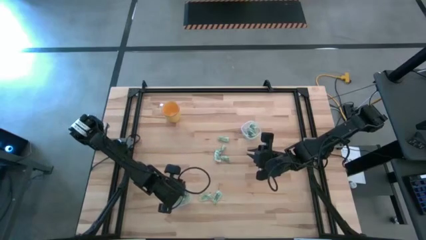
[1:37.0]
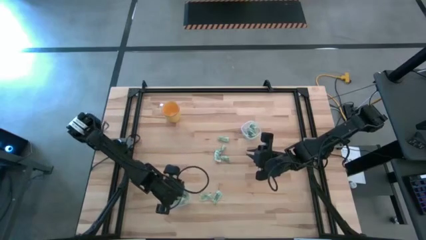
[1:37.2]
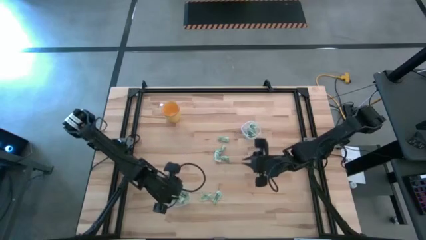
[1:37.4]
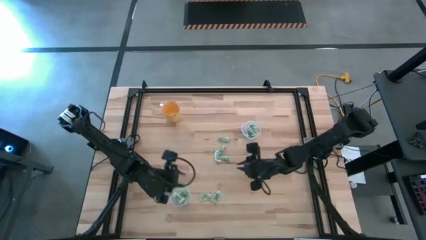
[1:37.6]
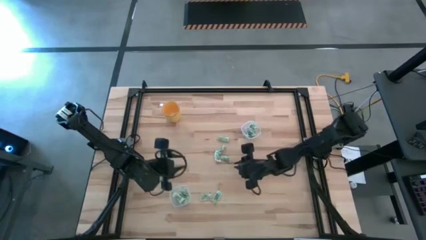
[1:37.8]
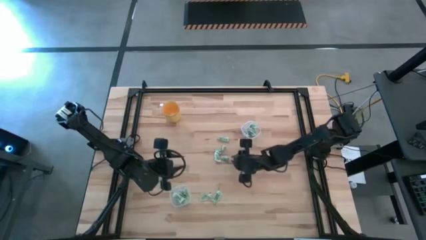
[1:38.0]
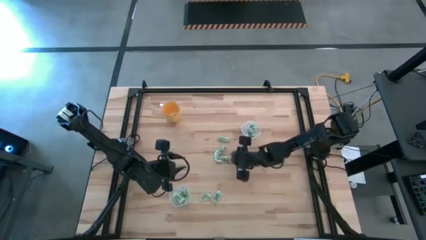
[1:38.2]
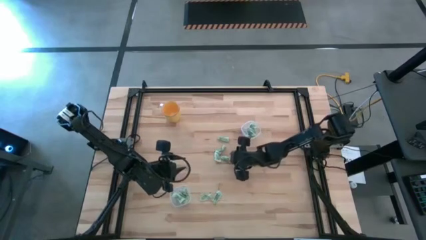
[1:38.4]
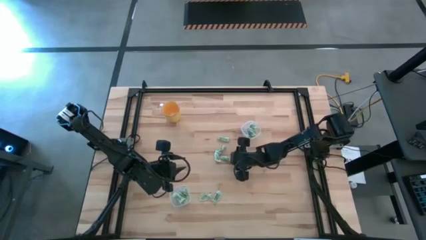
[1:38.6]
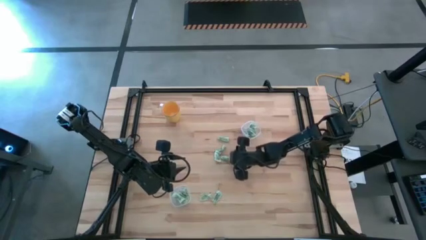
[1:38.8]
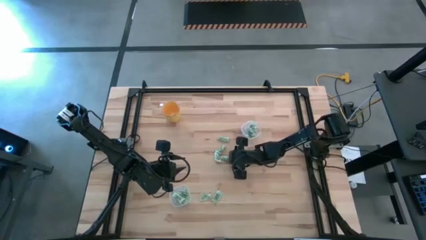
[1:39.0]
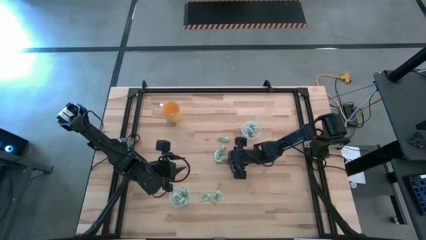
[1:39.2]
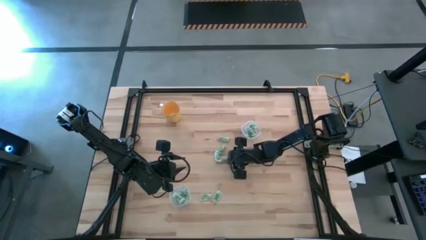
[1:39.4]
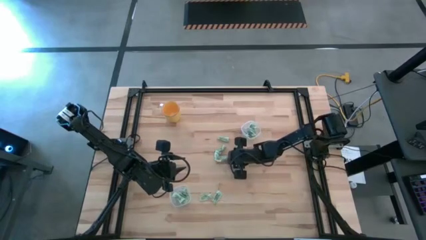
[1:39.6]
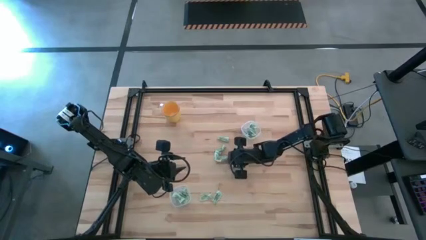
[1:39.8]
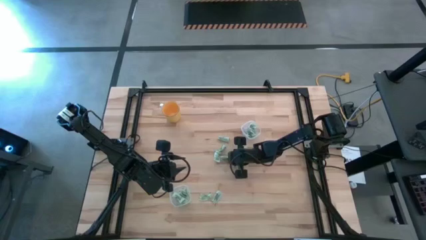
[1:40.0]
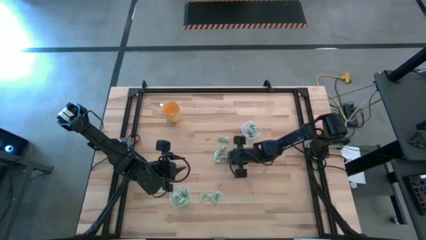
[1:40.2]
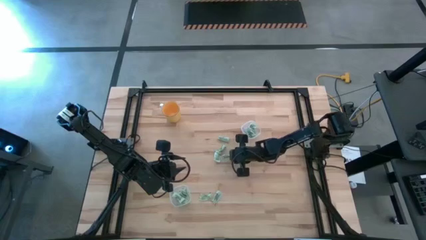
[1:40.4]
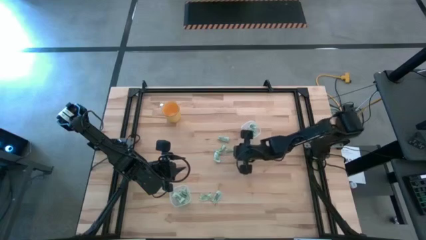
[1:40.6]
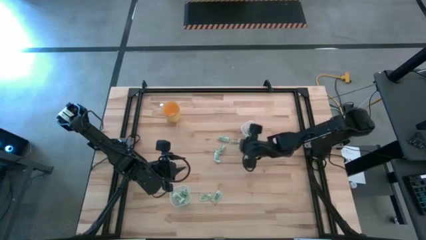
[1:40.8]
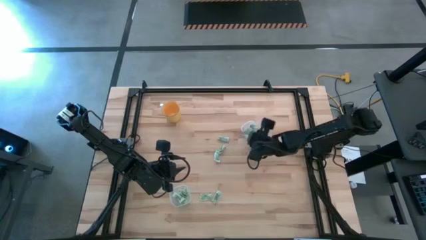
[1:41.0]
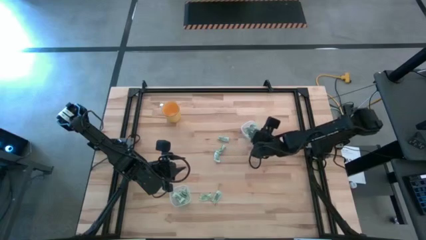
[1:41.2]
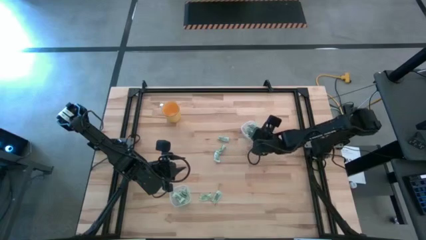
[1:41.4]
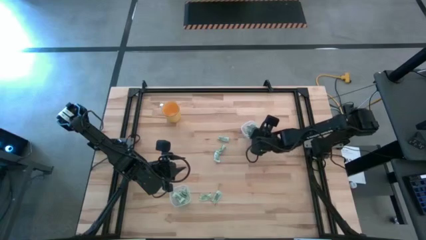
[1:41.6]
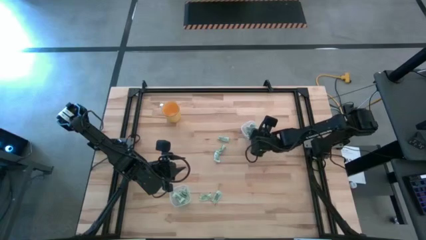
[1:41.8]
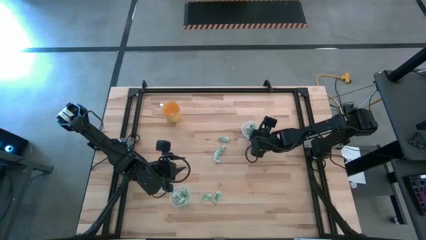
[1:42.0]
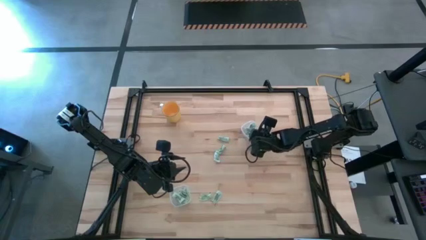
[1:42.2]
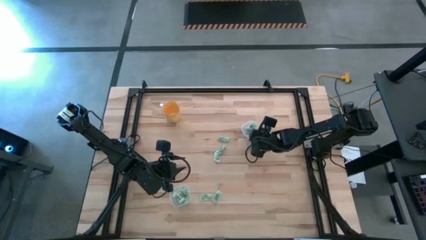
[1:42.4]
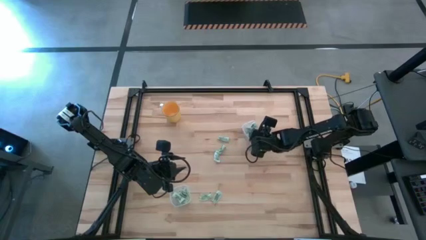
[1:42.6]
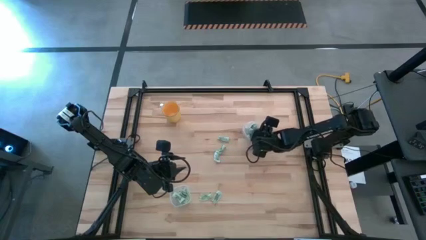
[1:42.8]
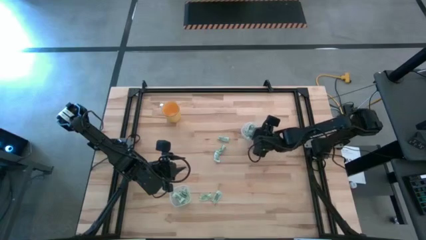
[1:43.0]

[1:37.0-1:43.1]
Task: Pick and place Stevia / Truvia into bins
Put the green stevia packet into the top transparent container

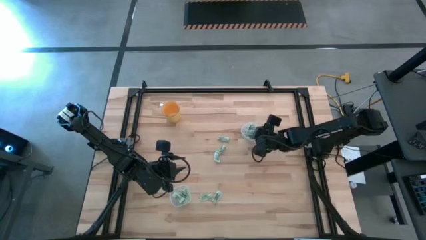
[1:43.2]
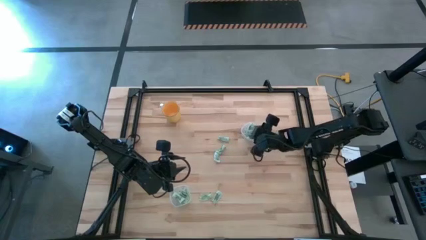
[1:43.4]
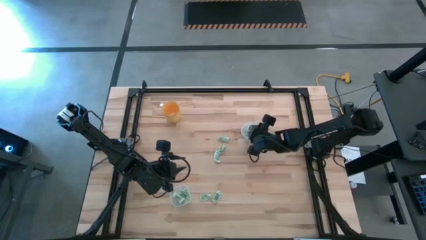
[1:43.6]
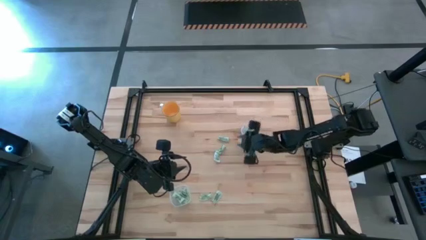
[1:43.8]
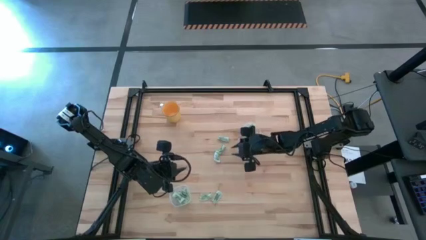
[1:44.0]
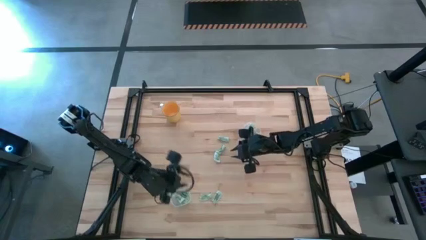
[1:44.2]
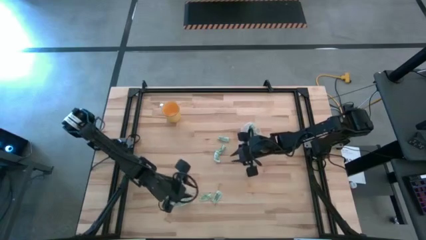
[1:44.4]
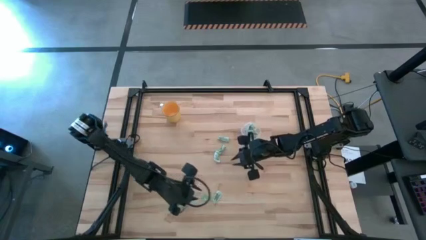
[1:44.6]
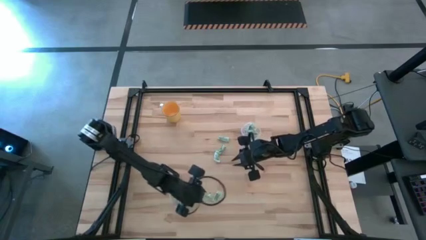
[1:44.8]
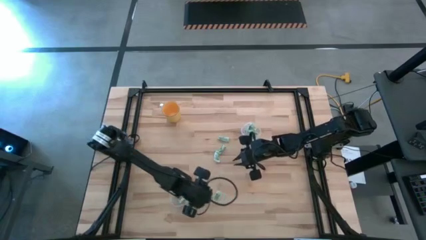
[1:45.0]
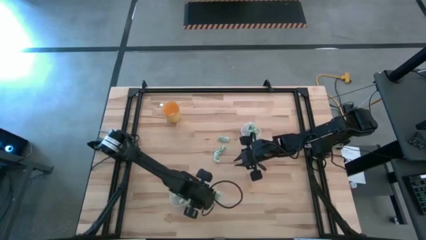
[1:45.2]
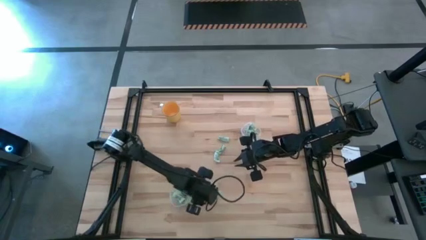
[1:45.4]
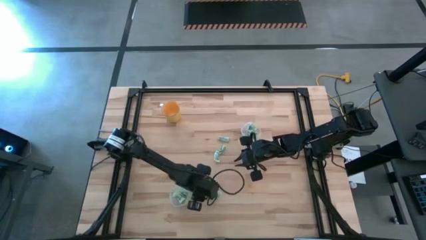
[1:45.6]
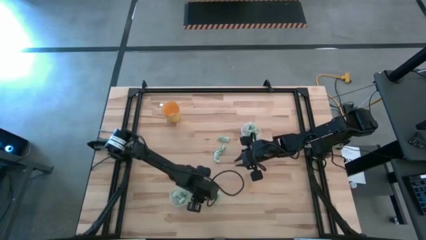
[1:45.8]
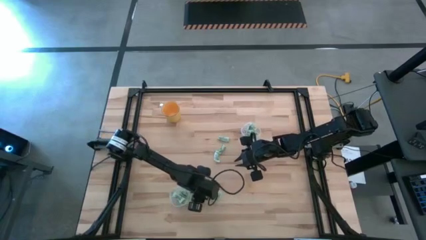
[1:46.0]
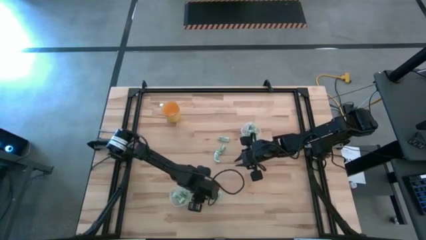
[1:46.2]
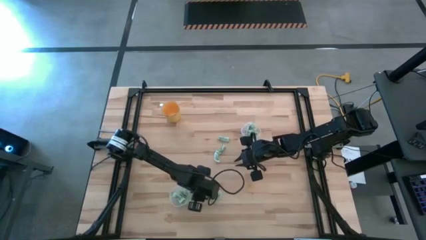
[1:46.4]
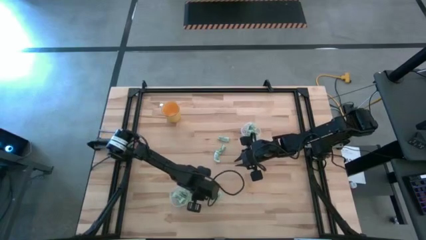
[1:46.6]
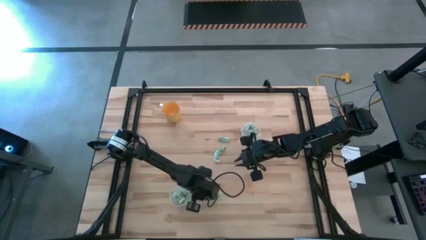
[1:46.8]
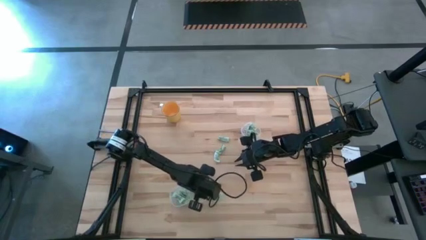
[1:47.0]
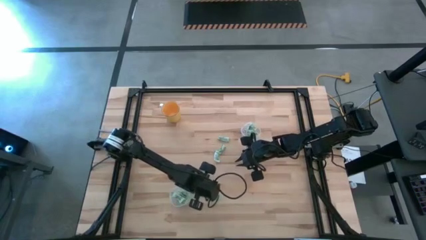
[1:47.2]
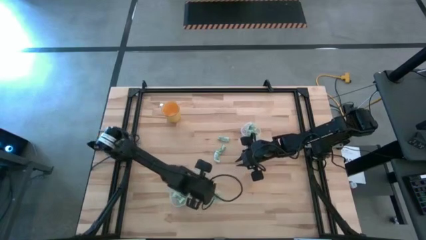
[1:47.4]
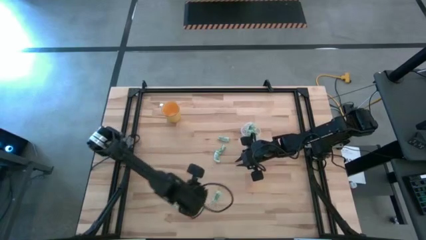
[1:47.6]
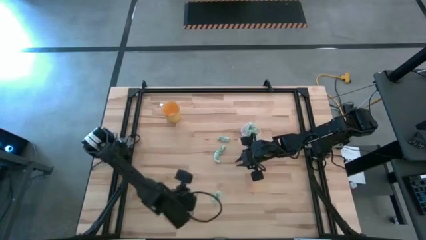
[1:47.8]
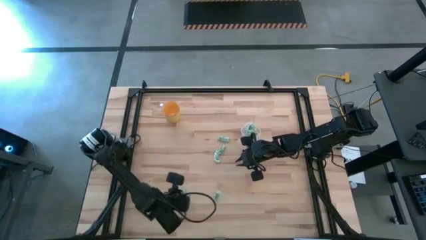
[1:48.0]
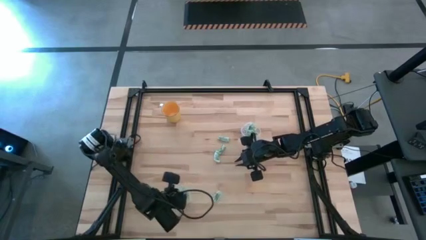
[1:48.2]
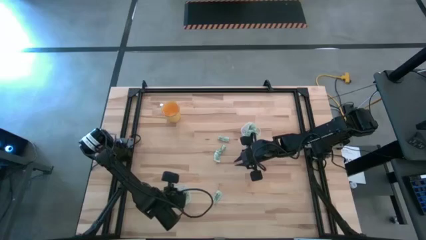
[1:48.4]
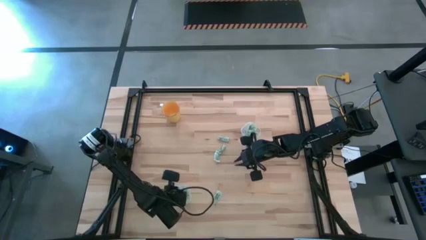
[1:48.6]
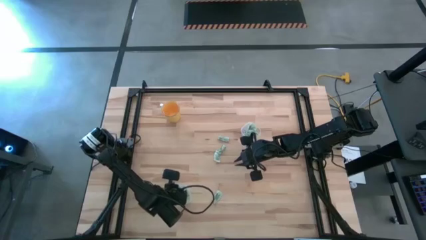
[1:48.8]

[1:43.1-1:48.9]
Put the green stevia packet into the bottom transparent container

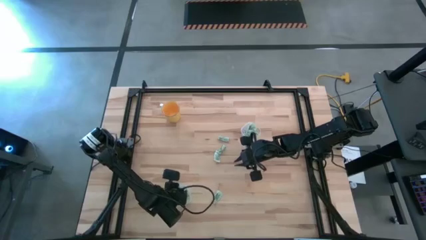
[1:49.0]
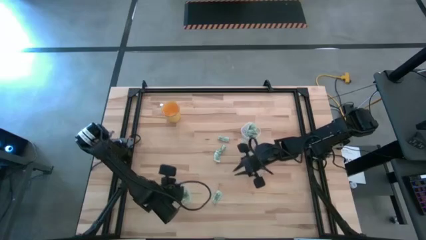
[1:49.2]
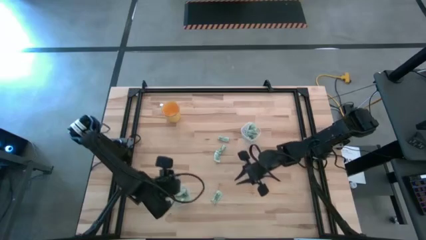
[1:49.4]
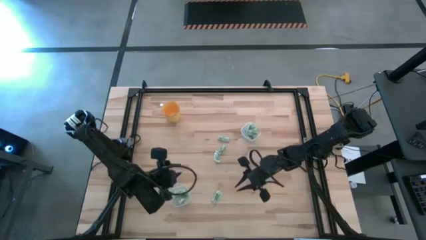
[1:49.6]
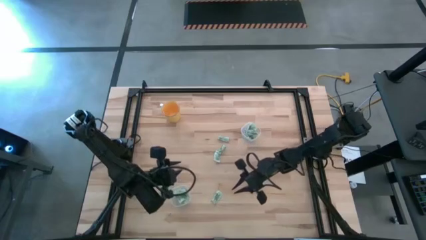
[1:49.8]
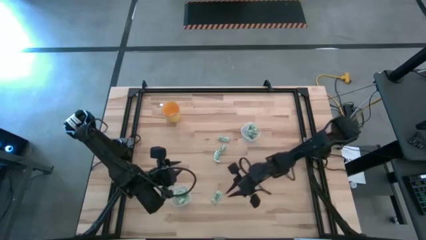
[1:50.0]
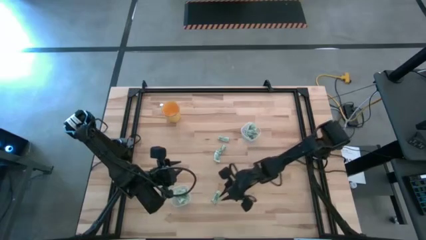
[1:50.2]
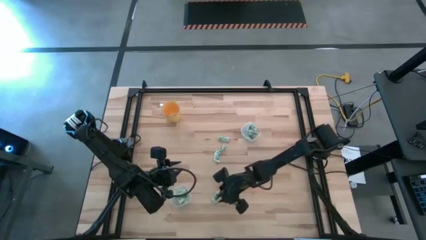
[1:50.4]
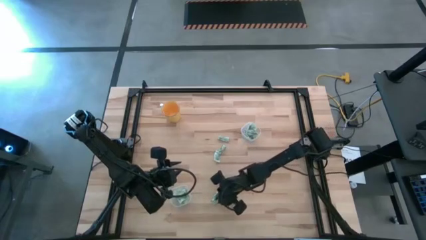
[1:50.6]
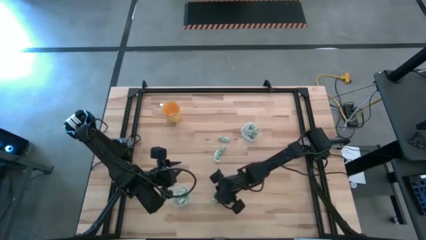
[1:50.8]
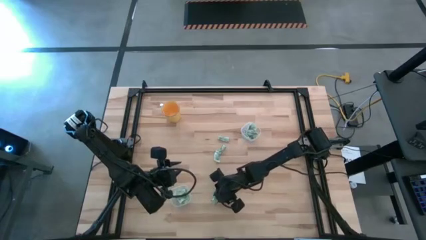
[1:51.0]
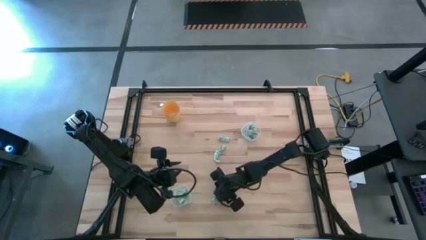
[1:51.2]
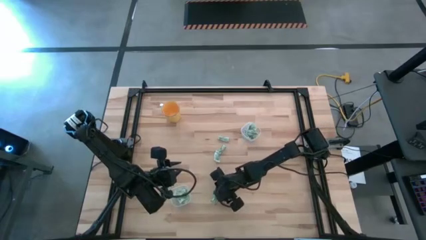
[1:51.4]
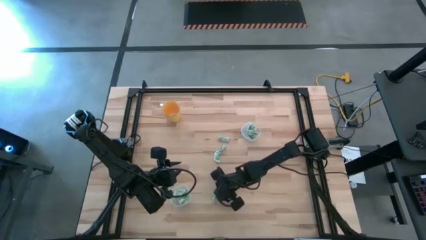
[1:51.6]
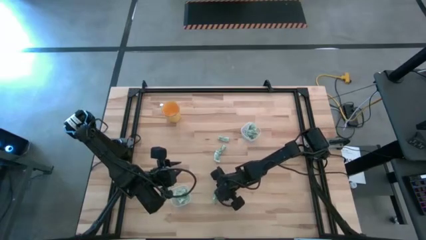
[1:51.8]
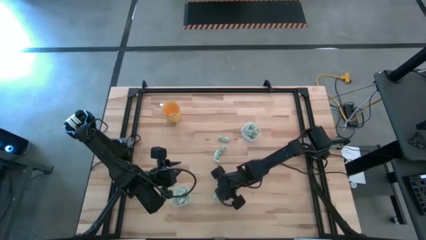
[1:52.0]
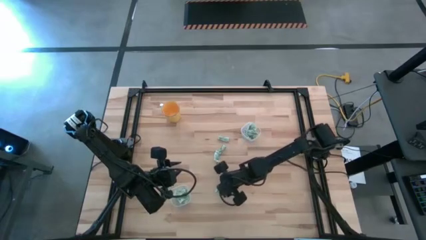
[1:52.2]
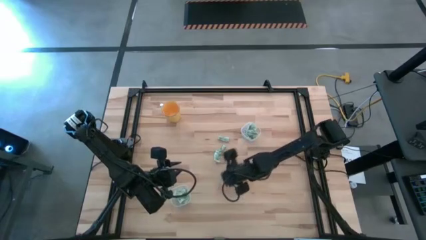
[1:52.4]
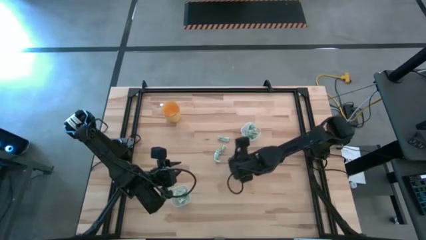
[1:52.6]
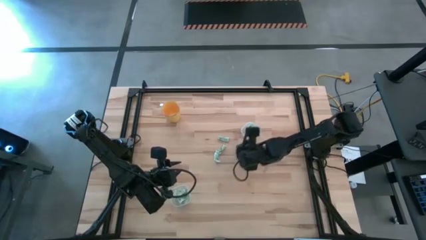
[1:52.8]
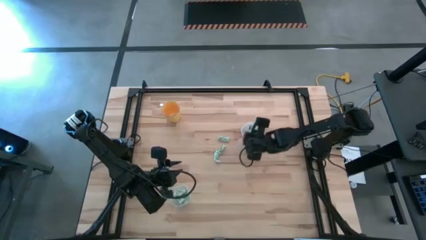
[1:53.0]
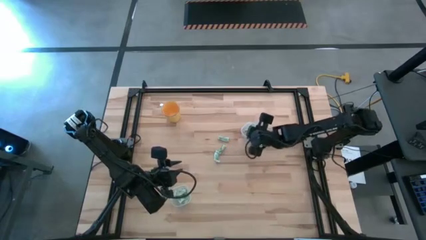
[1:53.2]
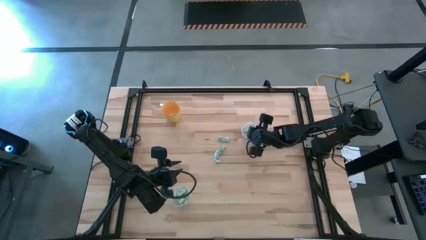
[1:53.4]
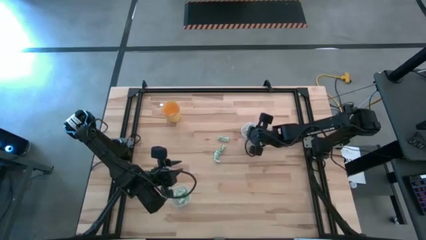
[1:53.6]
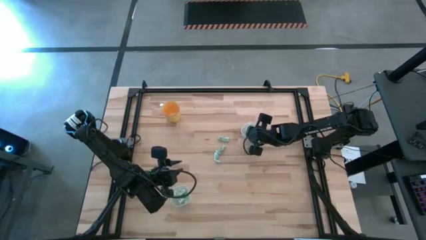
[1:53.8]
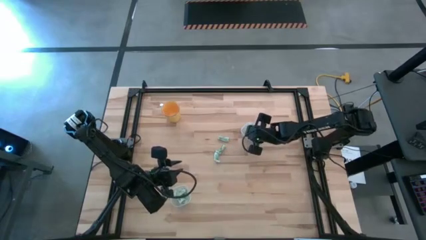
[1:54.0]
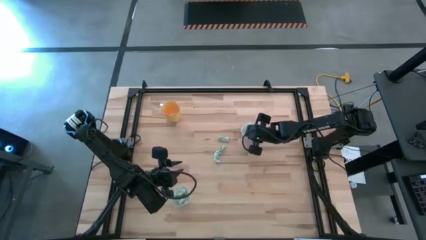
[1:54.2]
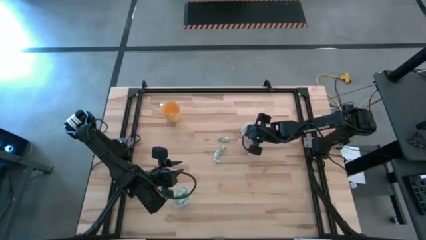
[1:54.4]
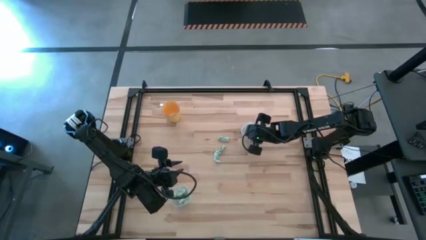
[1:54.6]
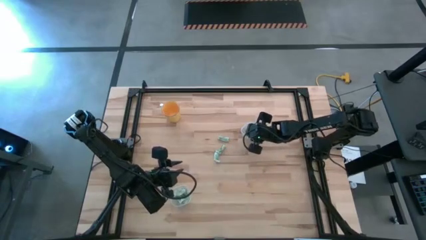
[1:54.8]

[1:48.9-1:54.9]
Put the green stevia packet into the top transparent container
